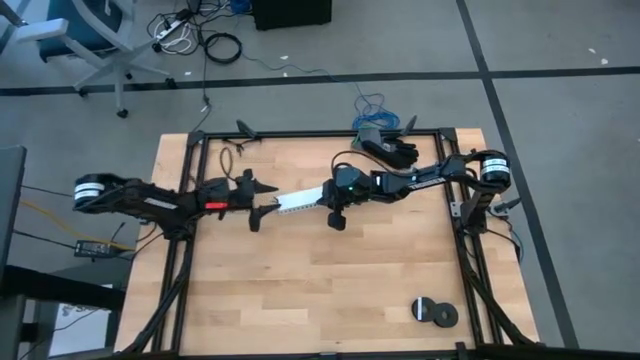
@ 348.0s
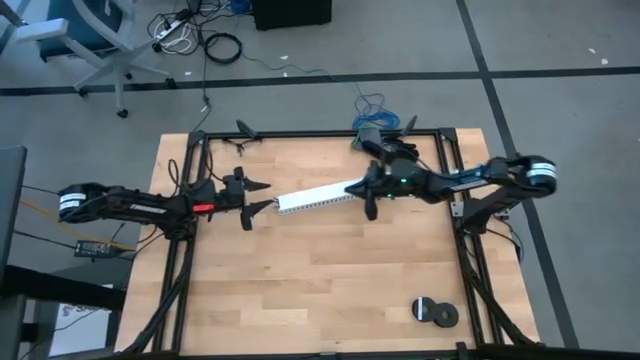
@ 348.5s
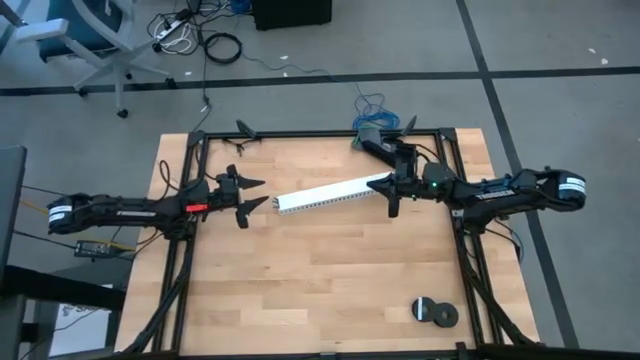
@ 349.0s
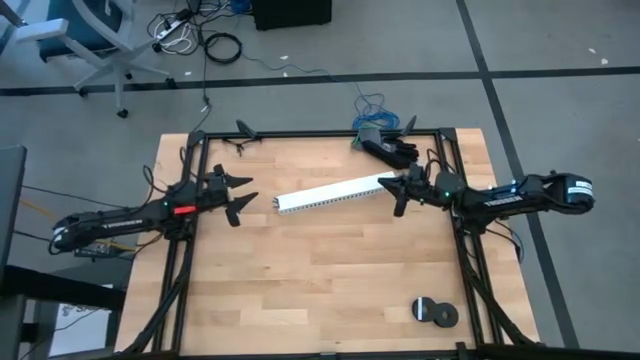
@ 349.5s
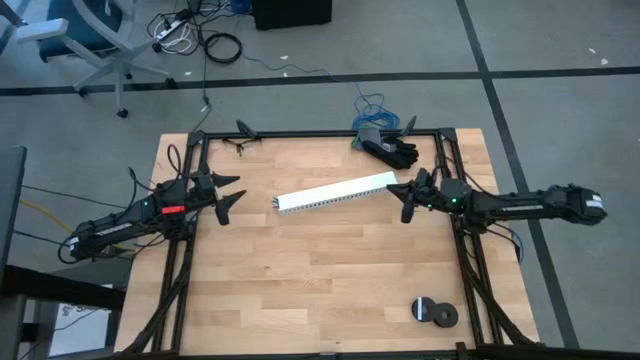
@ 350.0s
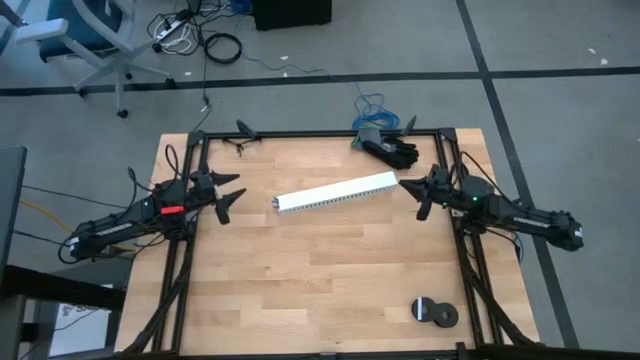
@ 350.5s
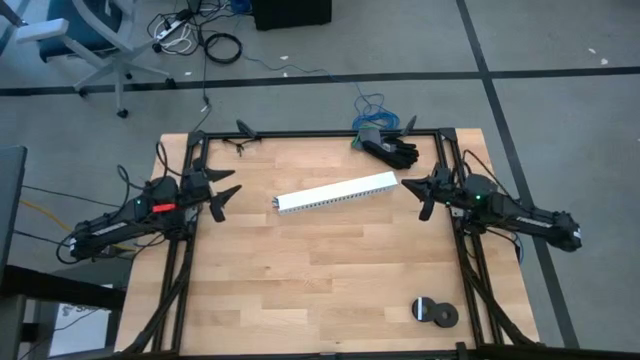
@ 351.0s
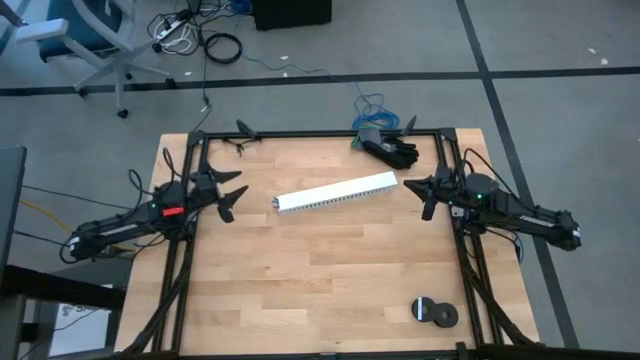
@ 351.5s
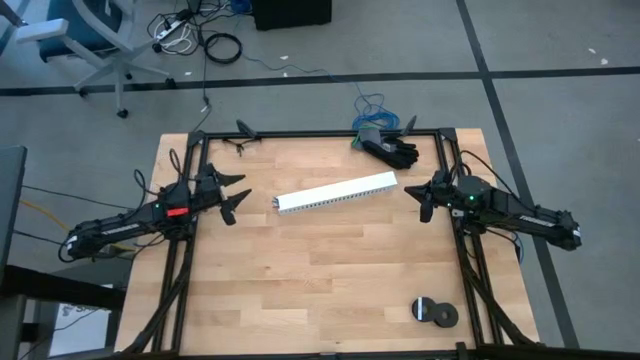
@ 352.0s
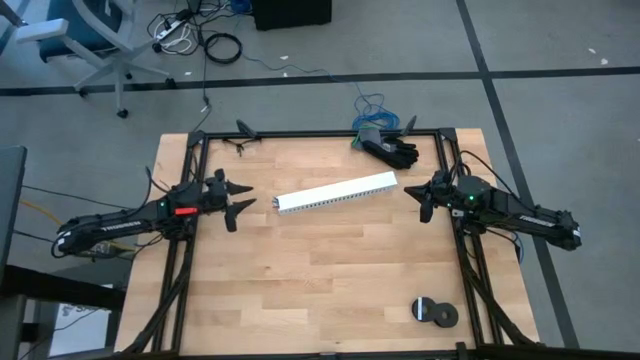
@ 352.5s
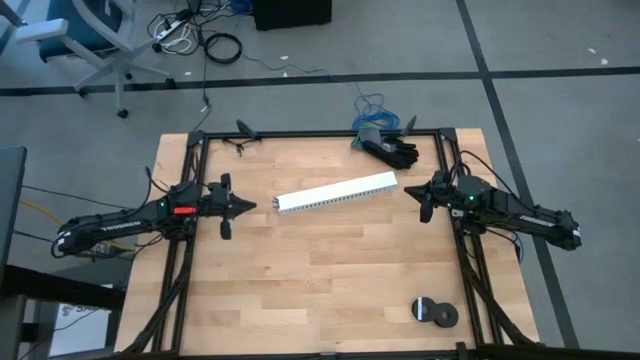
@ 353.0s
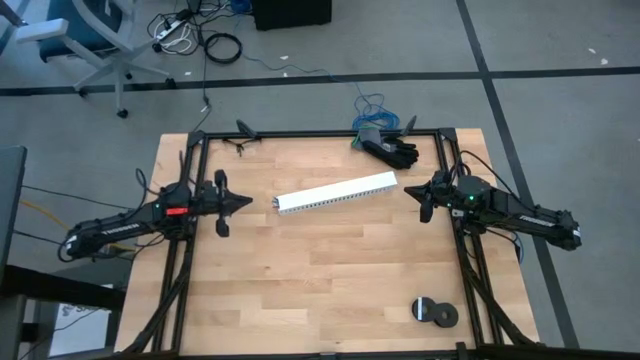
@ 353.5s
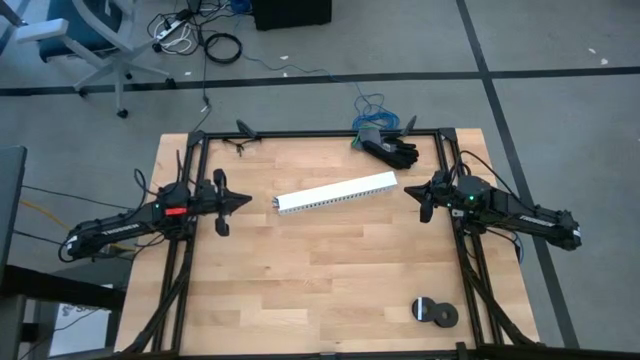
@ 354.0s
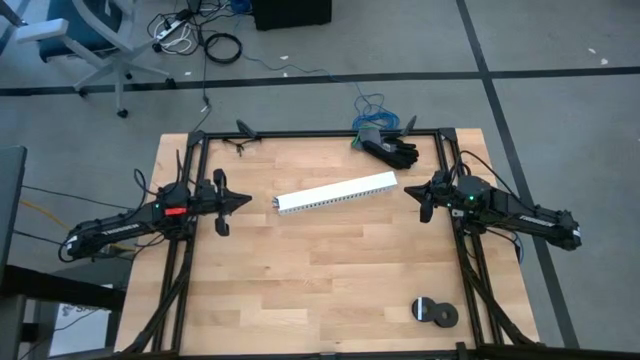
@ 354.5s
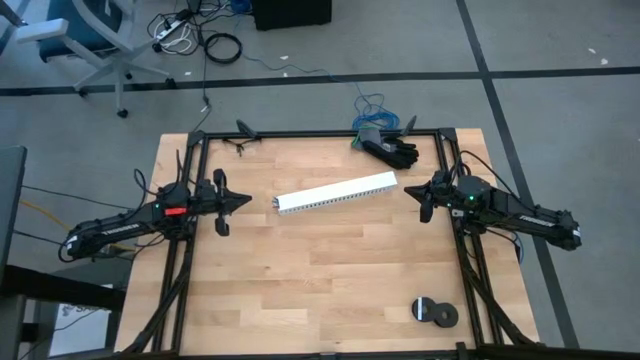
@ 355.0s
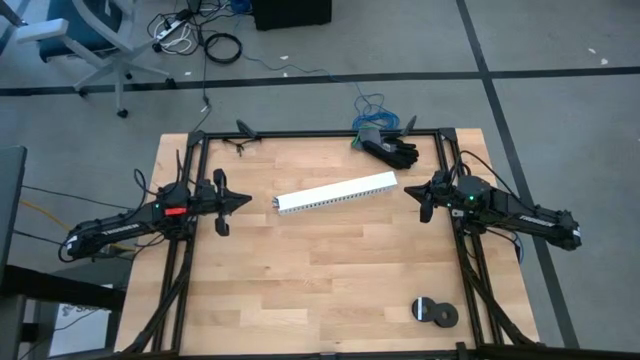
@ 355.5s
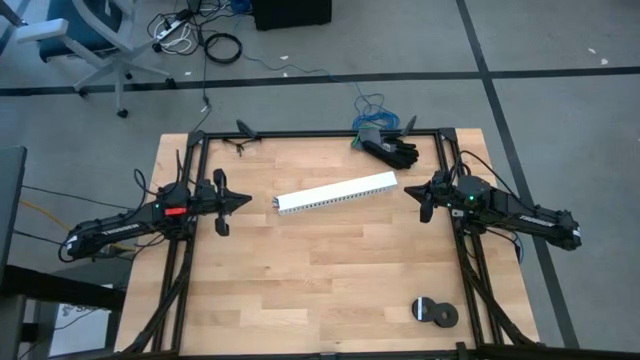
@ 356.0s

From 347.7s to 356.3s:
Task: Ziptie cables
Return to Home Position

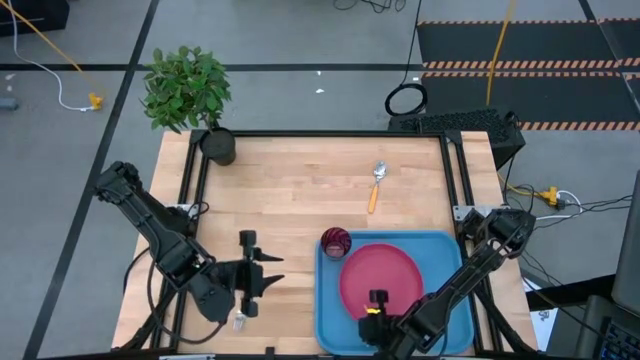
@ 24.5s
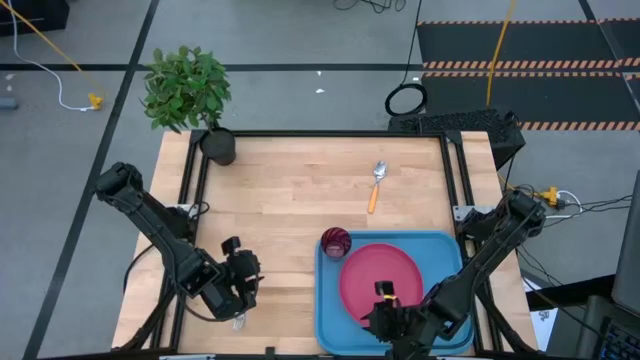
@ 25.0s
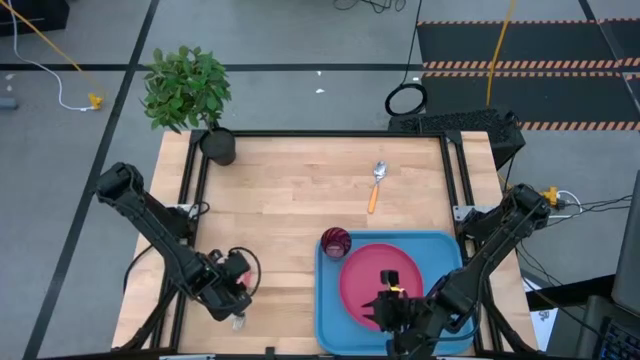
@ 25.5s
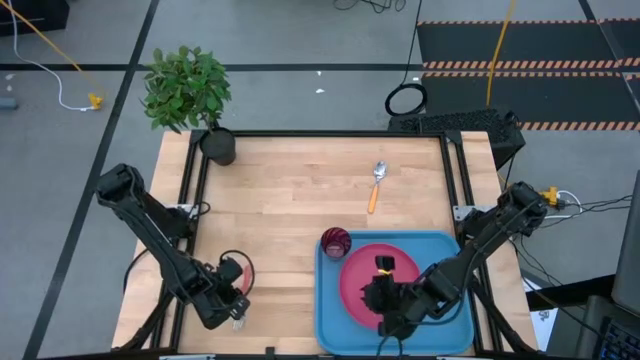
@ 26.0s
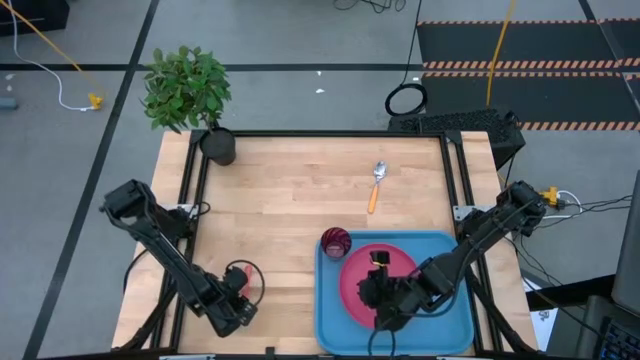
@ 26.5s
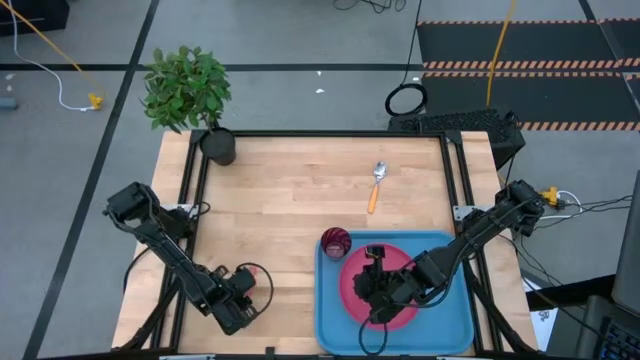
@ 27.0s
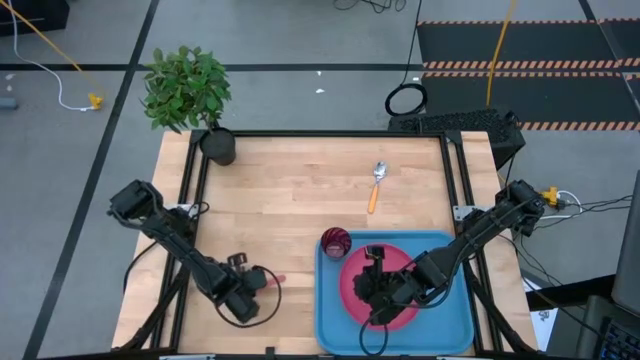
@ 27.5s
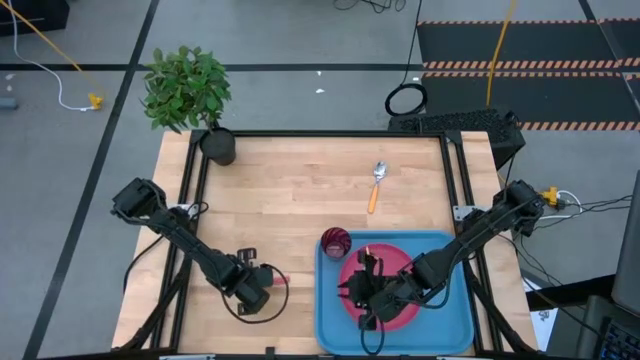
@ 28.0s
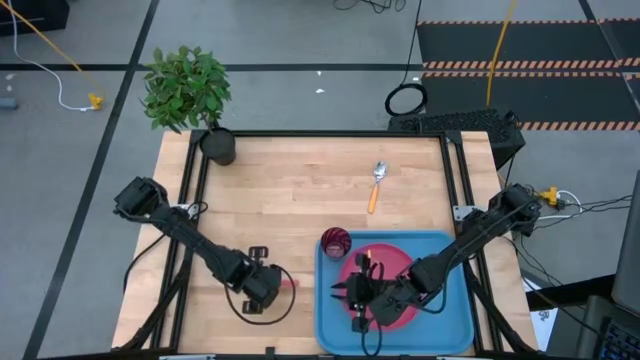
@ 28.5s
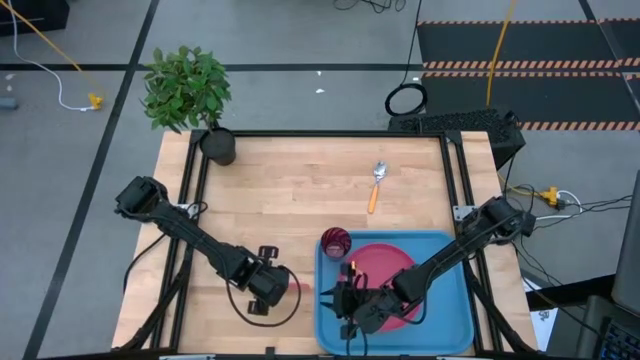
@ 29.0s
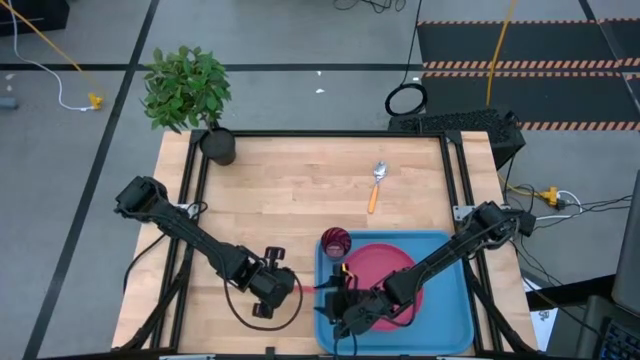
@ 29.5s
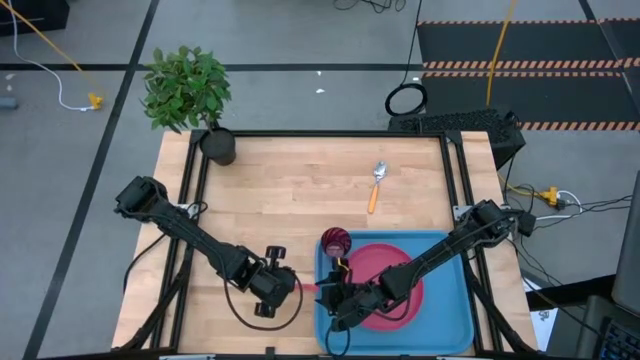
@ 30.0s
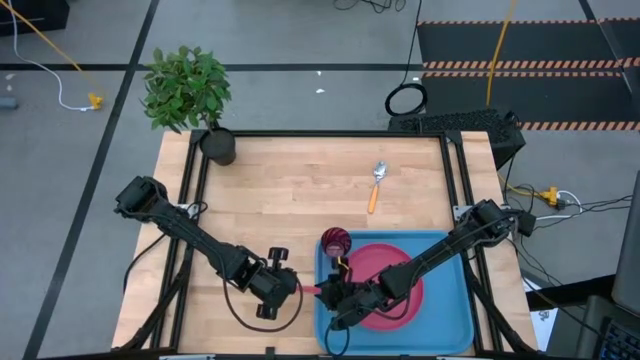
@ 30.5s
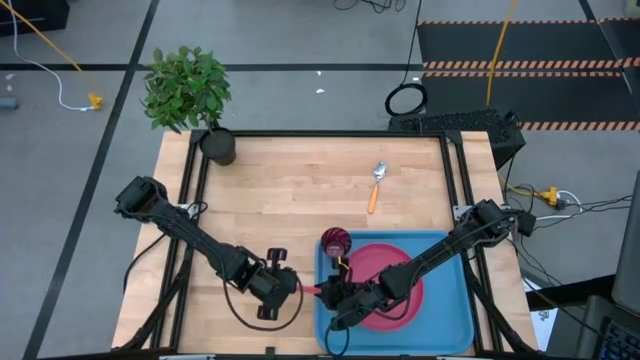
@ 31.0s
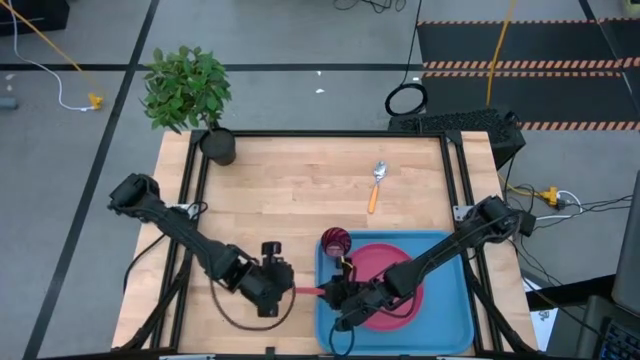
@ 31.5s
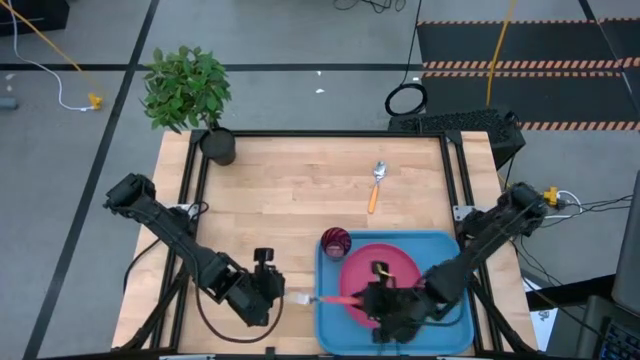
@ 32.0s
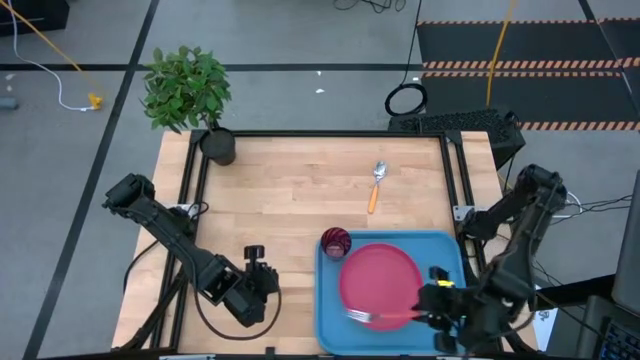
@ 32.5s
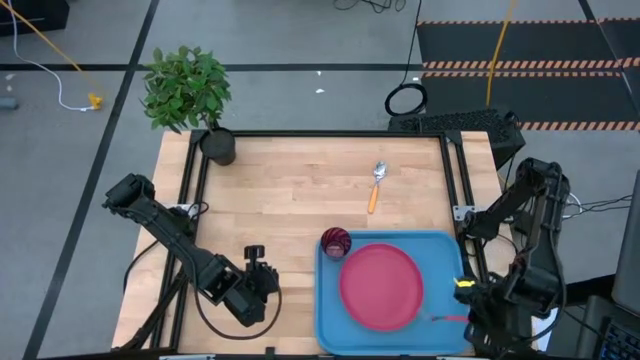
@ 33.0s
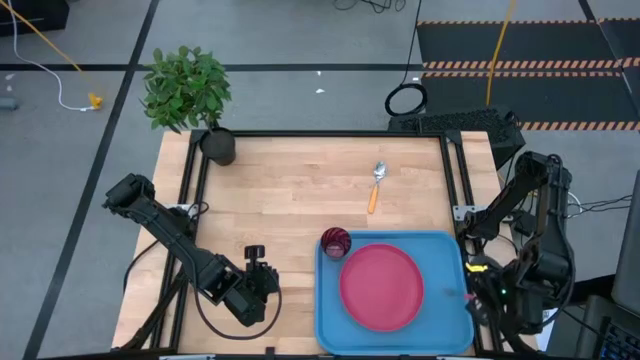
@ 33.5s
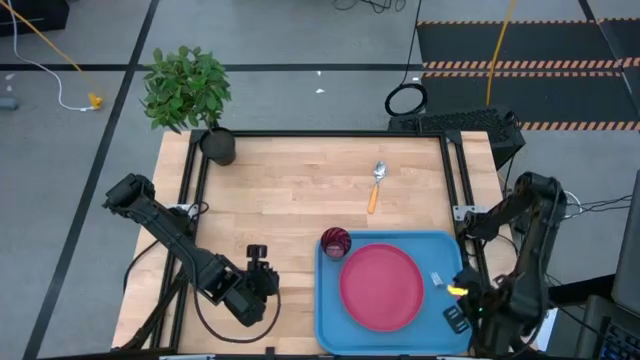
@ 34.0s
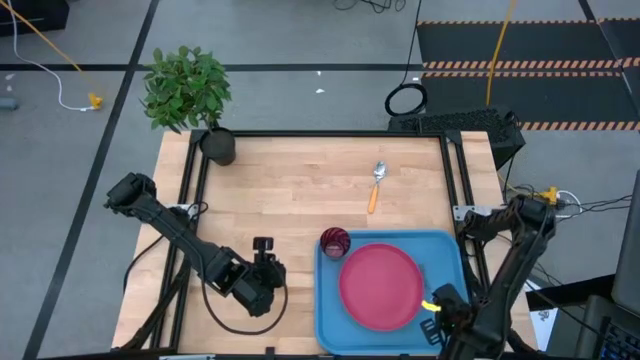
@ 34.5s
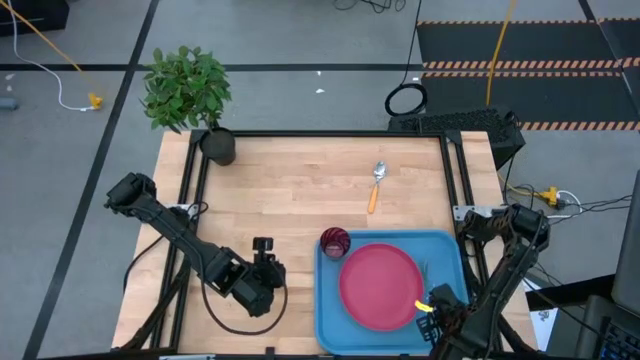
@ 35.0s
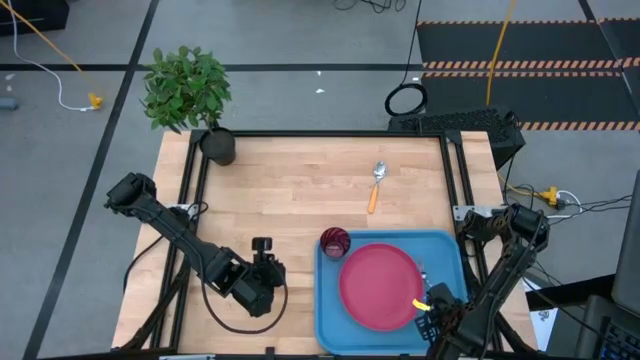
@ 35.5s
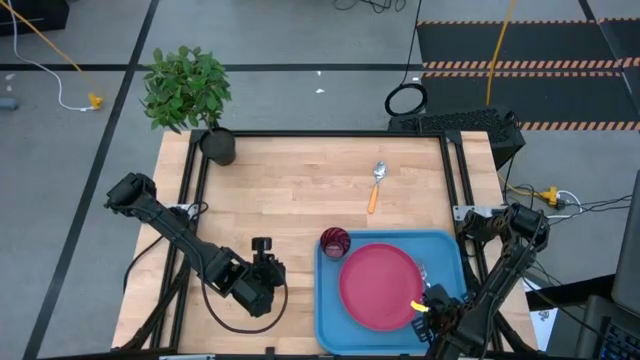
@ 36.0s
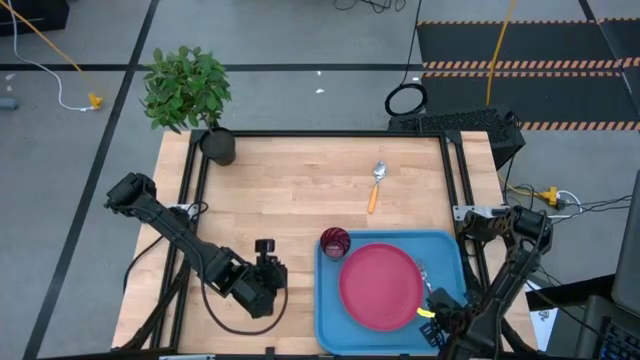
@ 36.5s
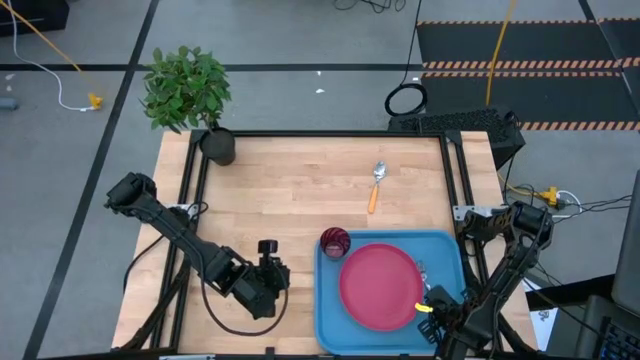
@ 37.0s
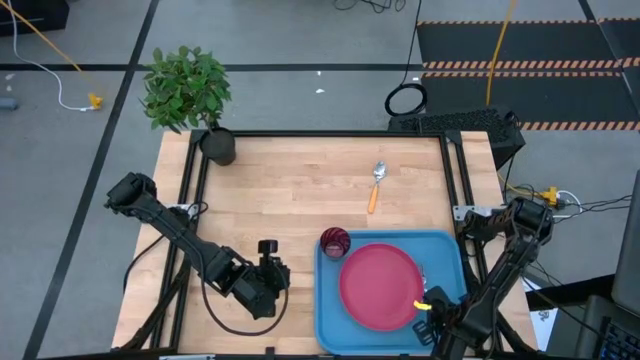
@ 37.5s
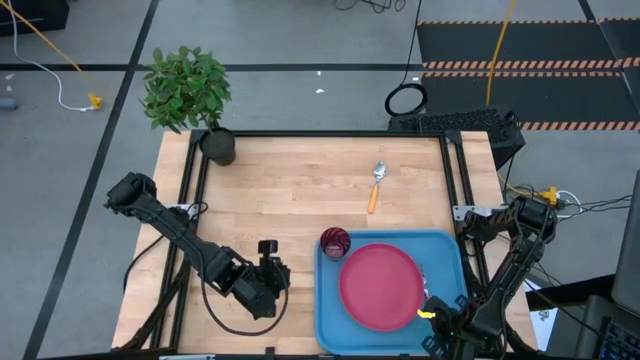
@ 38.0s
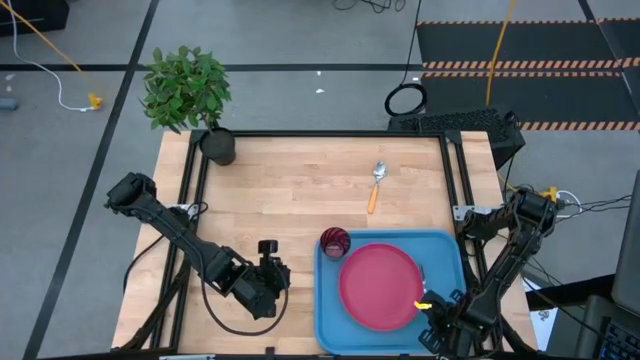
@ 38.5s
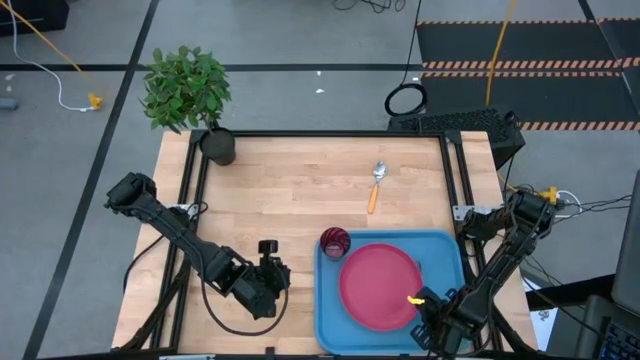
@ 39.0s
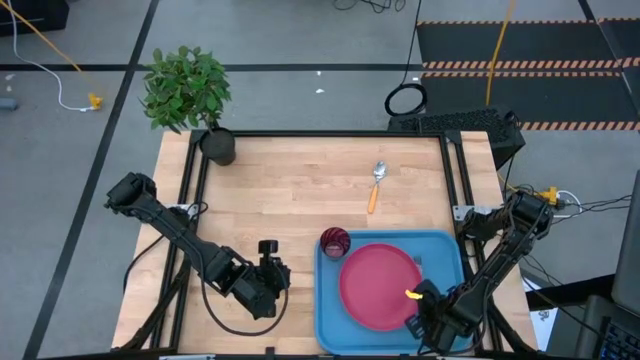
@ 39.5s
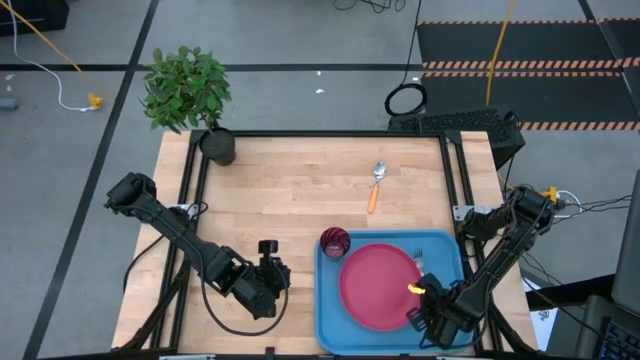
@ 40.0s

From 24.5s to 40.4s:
Task: Pick and place plate/cup/fork/spoon on tray
Put the red fork on the left of the red plate on the blue tray
